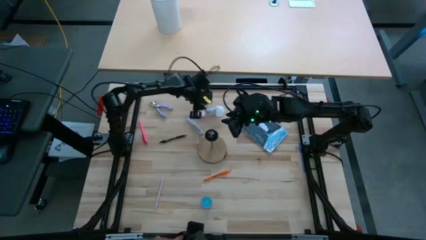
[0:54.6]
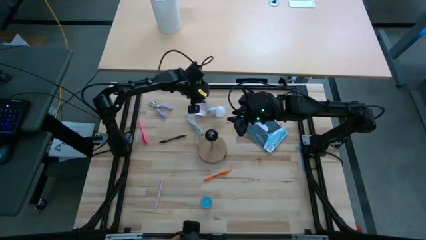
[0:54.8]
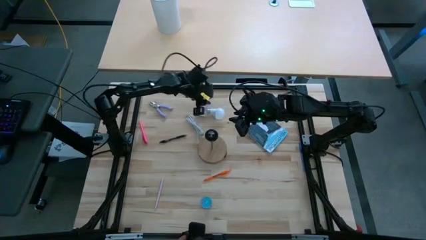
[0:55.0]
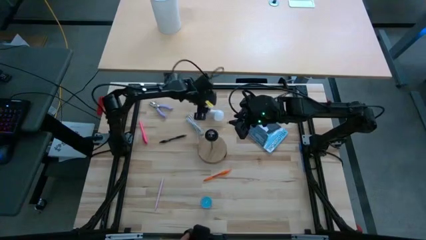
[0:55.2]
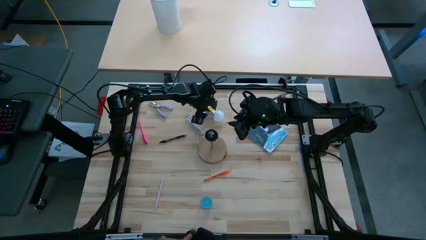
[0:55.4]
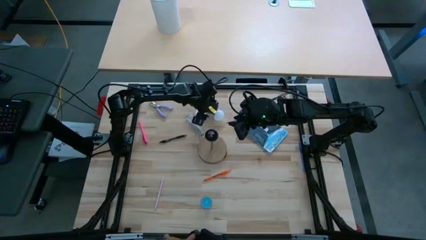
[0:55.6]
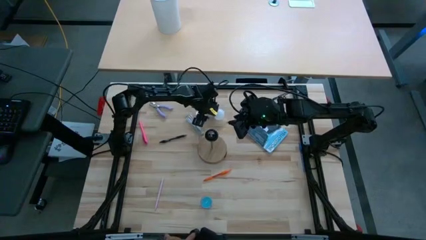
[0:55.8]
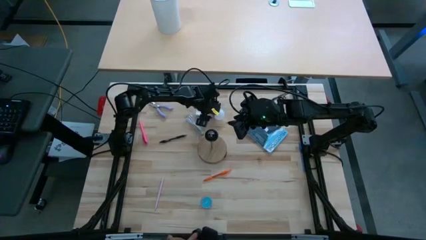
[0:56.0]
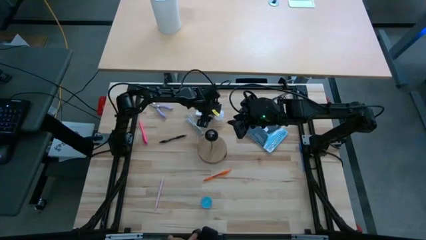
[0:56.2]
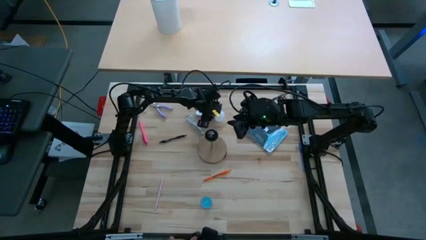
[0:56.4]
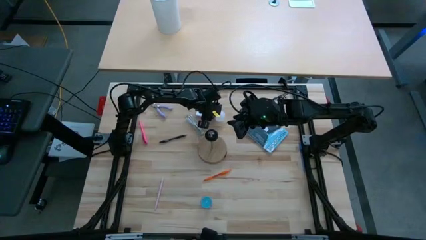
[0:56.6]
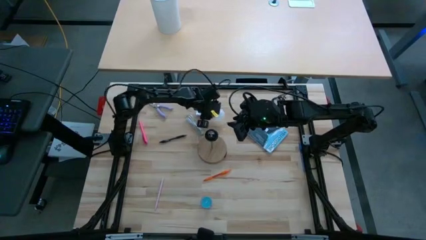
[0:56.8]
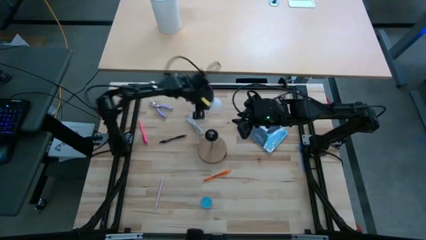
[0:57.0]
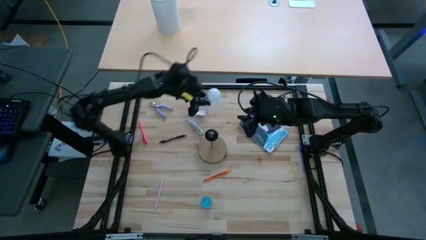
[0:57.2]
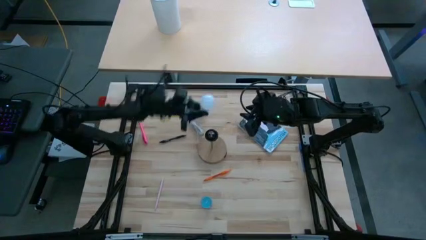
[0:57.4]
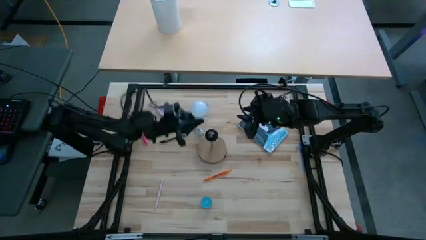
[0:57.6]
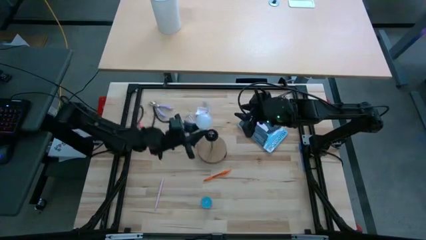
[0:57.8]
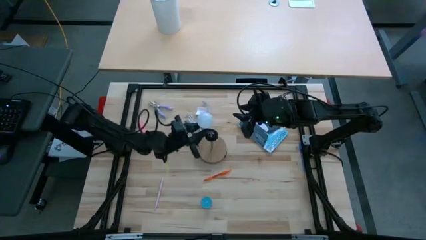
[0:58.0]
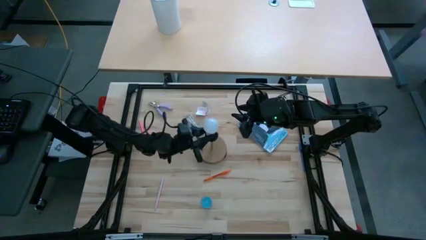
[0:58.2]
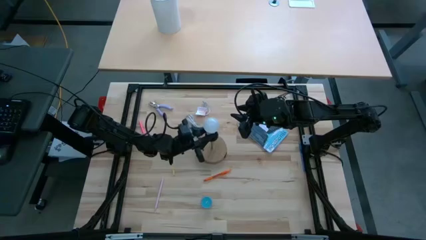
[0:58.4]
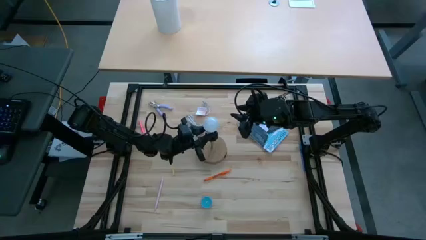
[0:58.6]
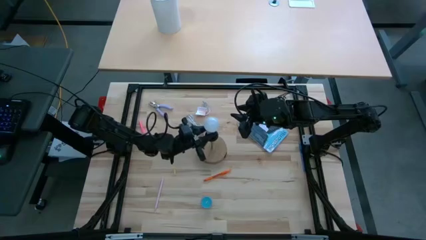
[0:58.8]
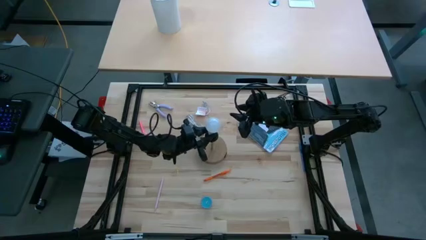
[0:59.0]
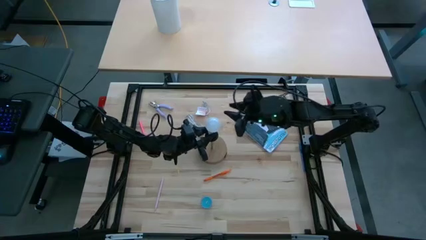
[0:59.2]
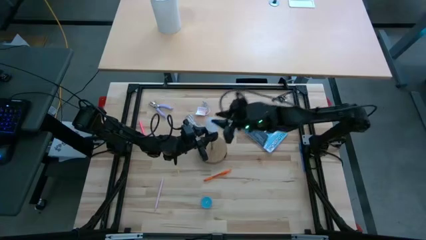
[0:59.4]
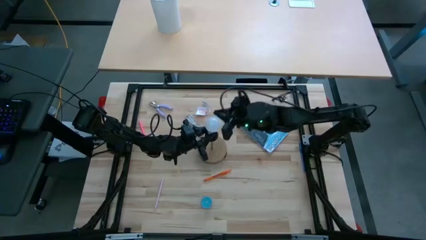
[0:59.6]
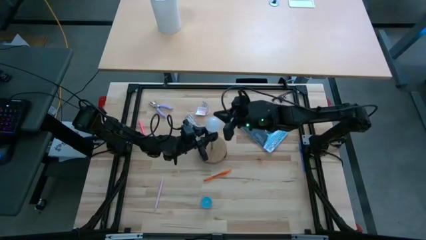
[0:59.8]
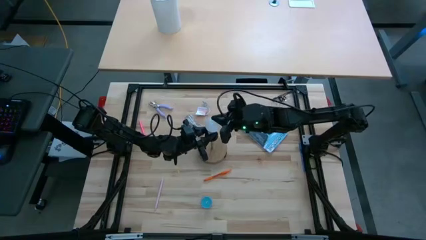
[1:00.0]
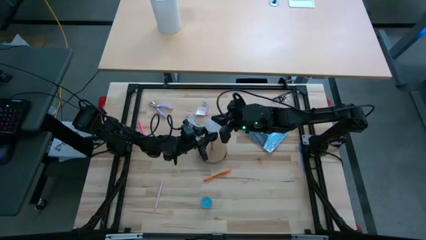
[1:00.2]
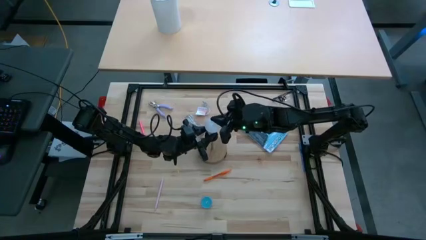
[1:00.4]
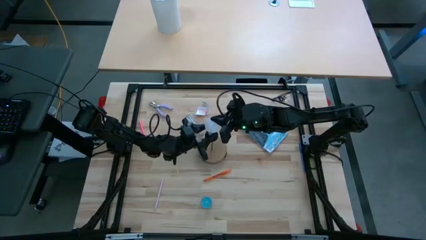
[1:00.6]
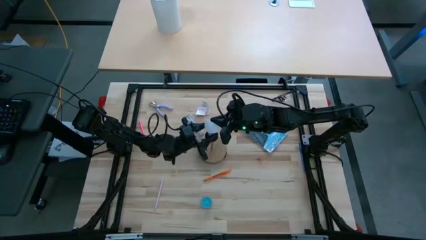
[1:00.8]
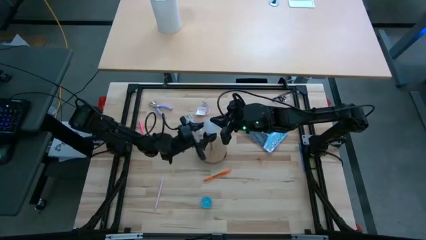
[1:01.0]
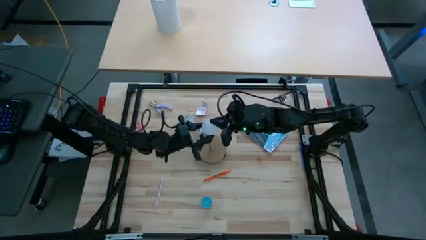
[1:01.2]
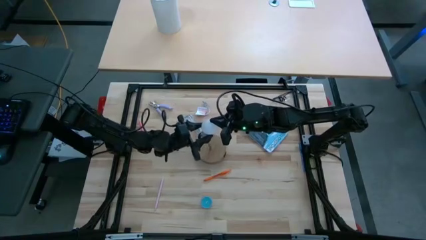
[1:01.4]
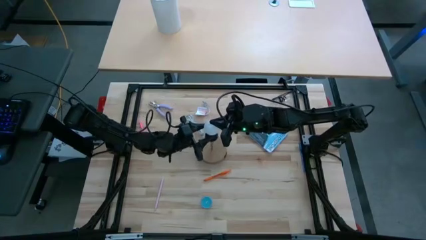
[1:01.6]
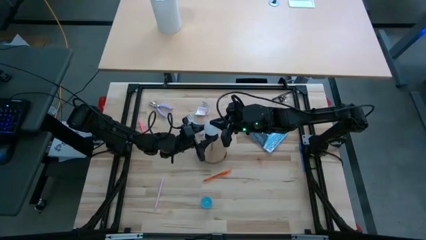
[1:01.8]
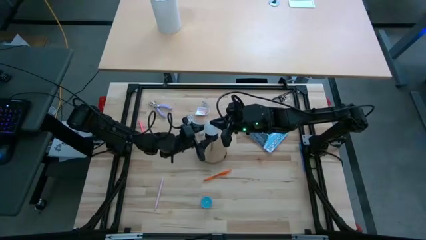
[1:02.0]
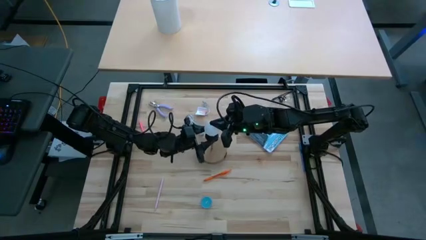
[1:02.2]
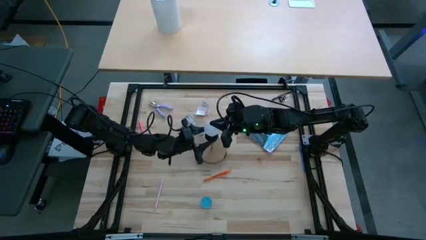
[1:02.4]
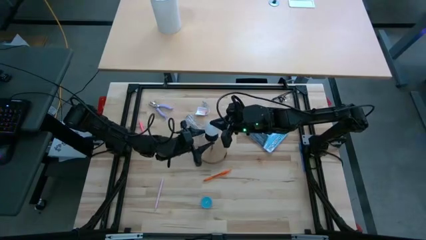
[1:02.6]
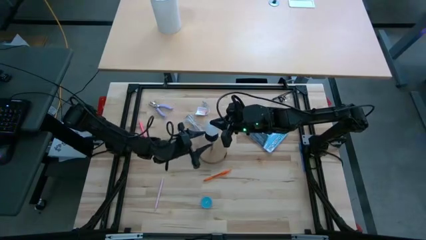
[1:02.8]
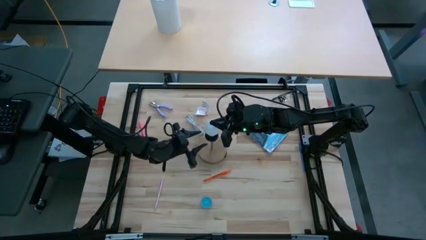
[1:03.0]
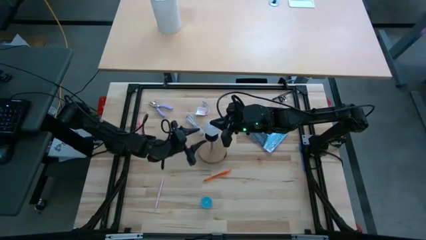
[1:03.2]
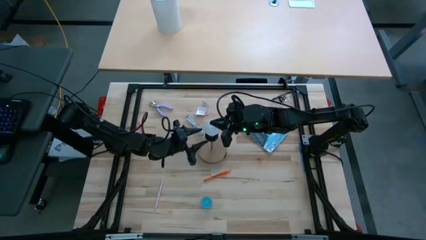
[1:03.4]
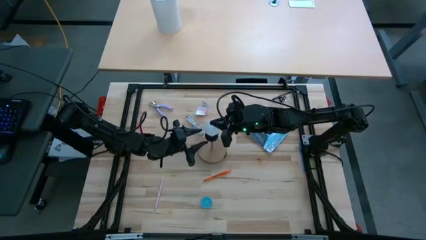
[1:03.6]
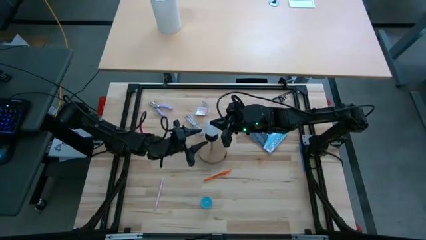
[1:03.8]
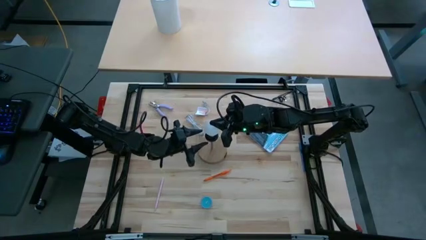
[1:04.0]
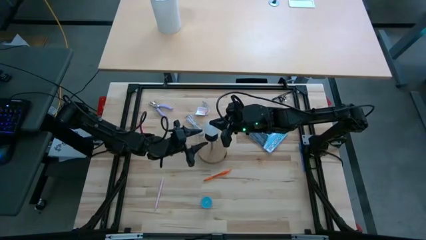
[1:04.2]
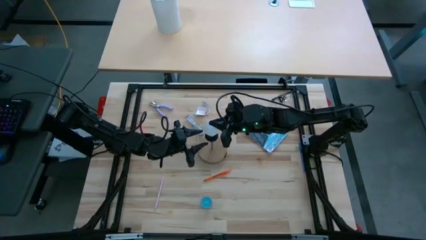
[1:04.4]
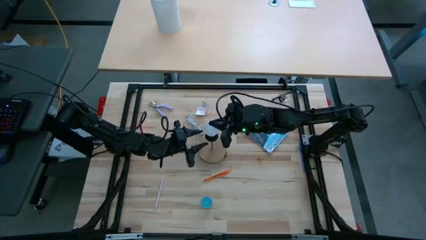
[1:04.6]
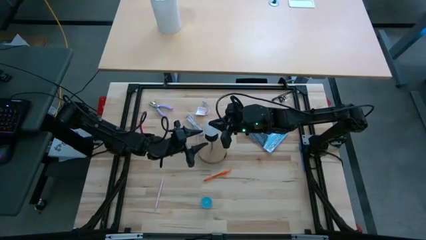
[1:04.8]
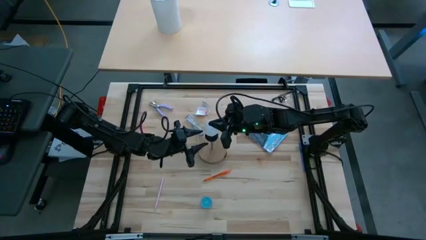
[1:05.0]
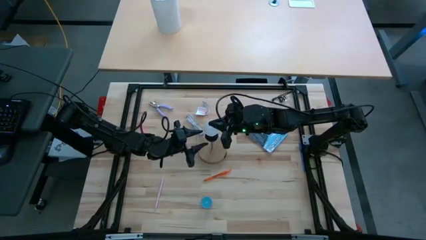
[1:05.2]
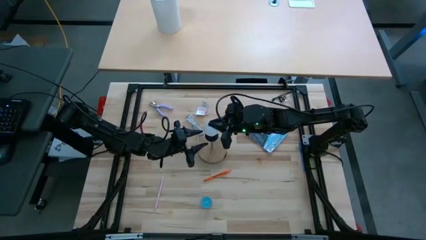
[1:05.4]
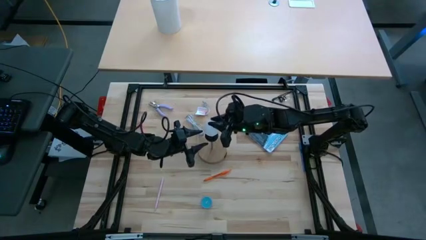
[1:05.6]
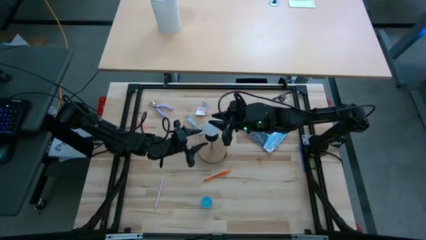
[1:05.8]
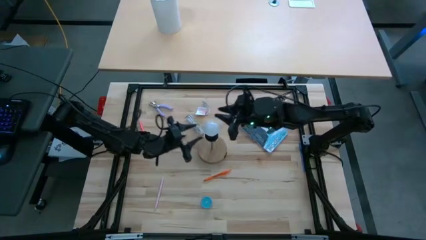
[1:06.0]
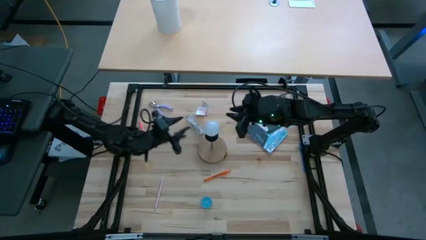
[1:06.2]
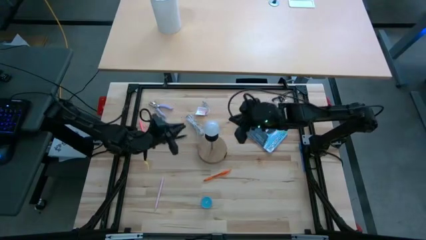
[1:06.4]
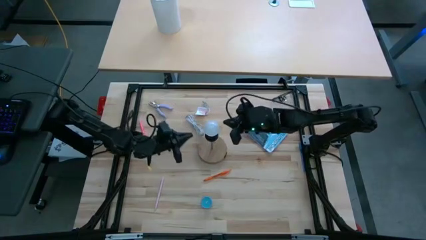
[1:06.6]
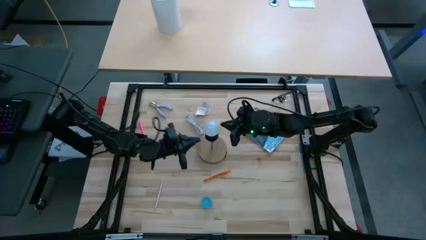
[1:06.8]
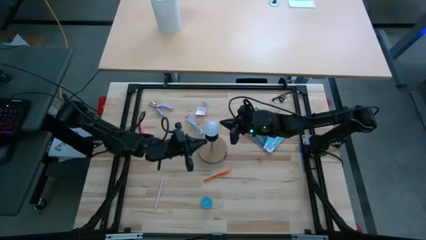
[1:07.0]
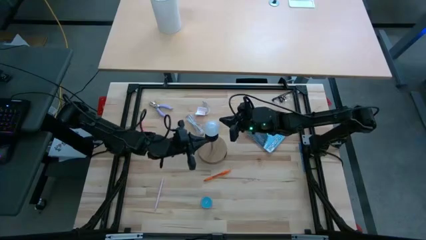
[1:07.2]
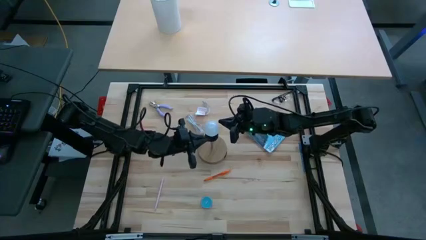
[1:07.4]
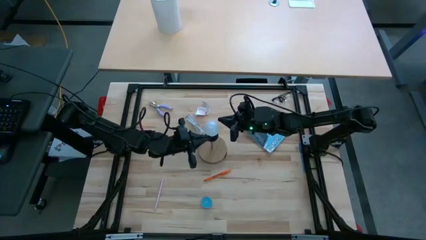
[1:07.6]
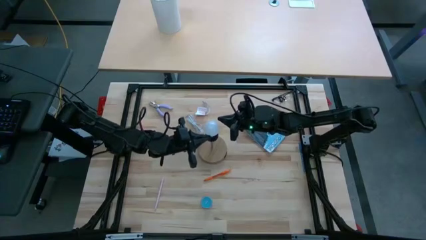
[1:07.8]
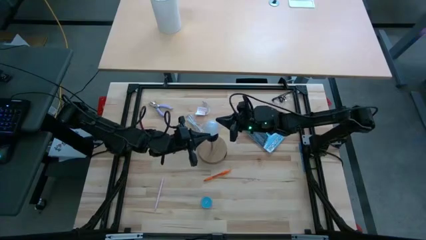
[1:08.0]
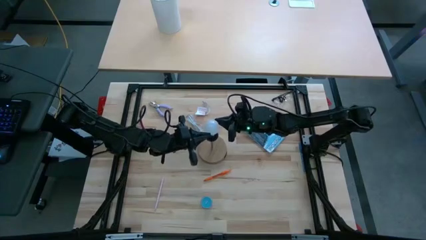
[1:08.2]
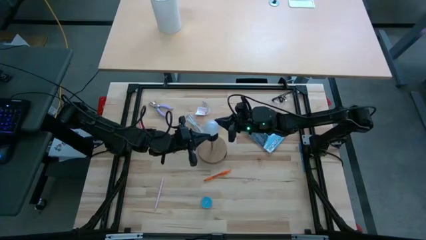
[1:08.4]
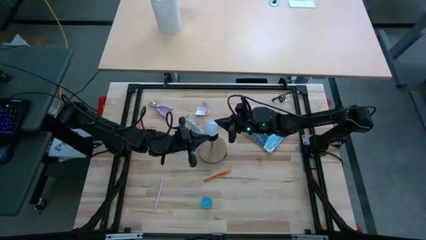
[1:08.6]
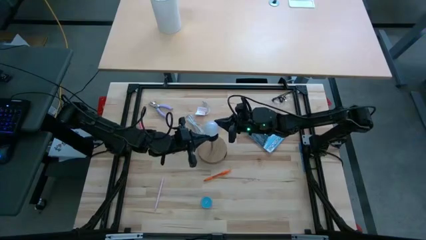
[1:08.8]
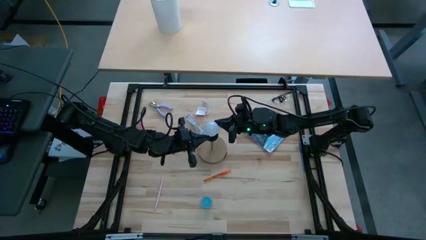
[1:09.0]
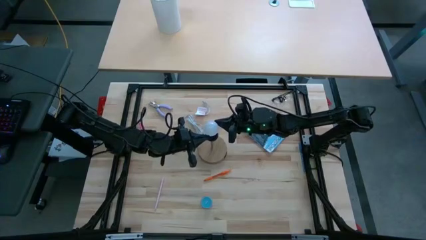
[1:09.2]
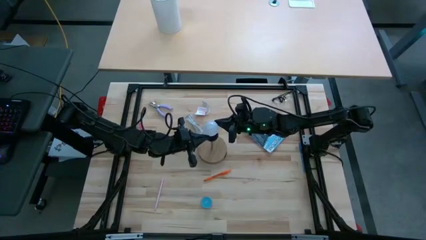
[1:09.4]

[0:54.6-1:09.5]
Task: Screw lightbulb
Insert the light bulb into the lamp

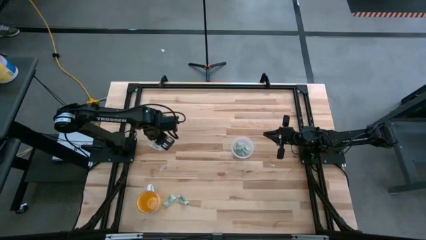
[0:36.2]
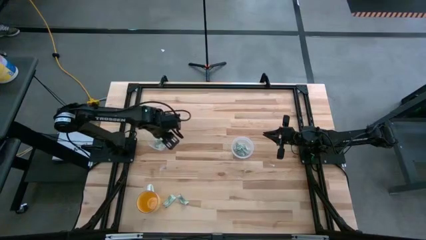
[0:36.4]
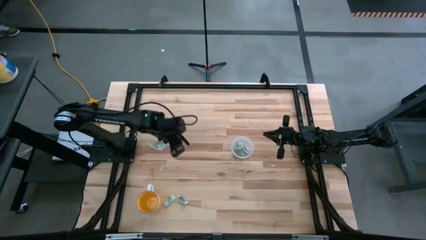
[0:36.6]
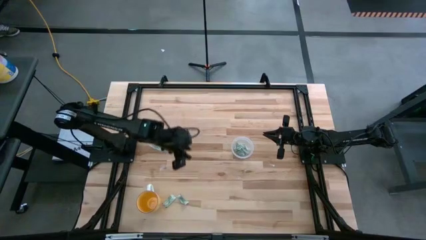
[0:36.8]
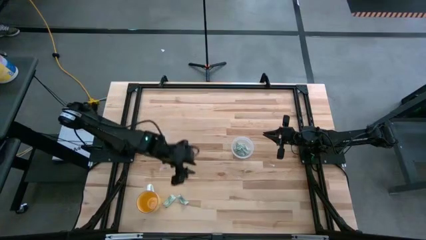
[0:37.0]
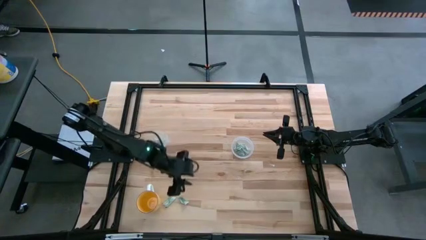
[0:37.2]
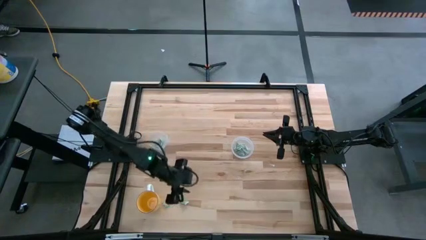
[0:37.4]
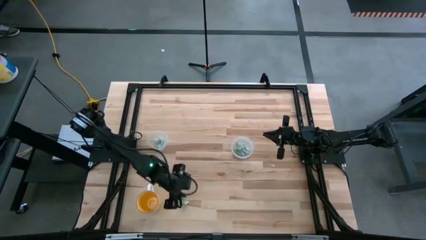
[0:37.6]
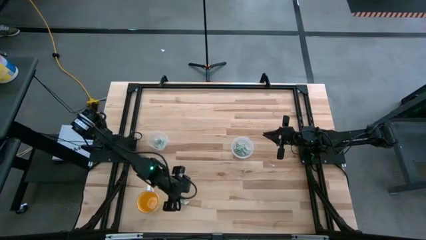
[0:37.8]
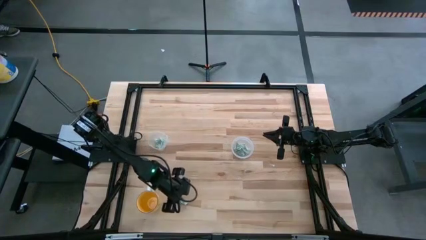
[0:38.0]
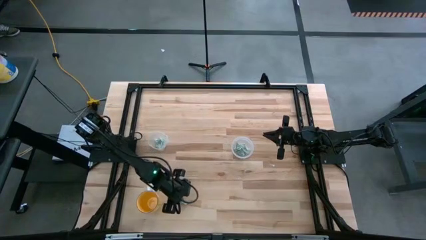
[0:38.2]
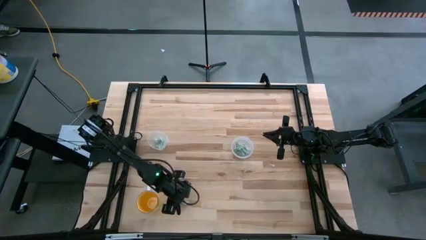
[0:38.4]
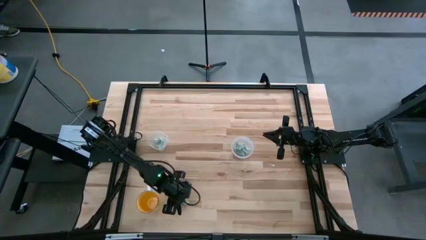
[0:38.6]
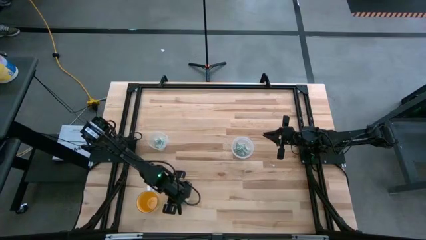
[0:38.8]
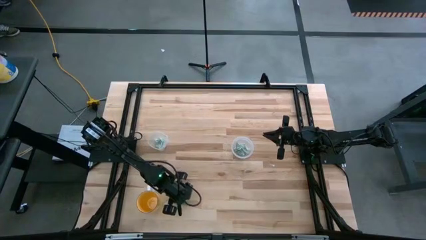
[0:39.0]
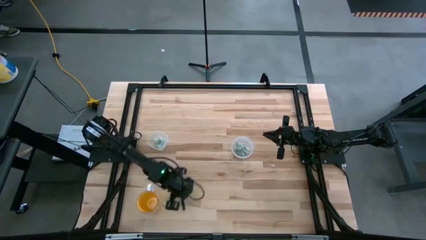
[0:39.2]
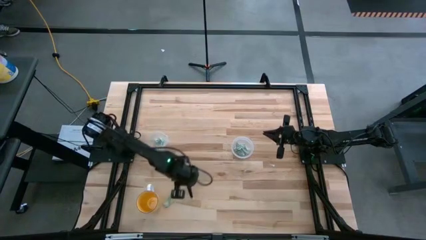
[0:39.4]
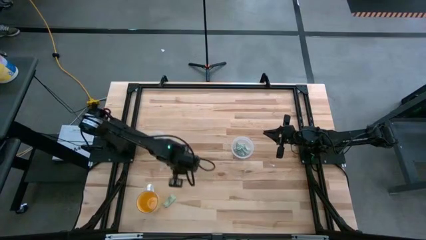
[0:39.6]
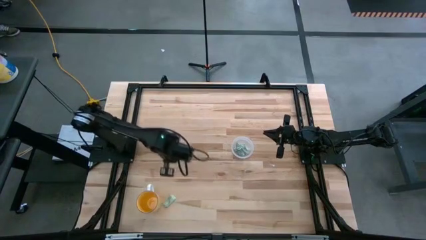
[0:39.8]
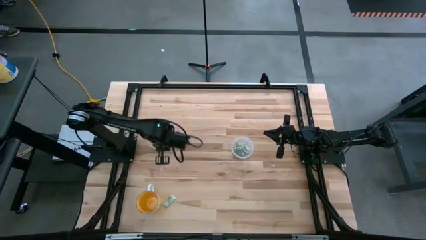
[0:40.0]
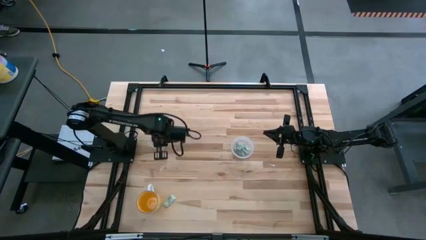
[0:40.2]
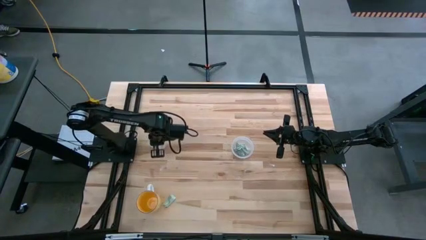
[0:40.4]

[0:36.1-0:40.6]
Task: Pick and place items into bin
Put the stevia pack into the left transparent bin
